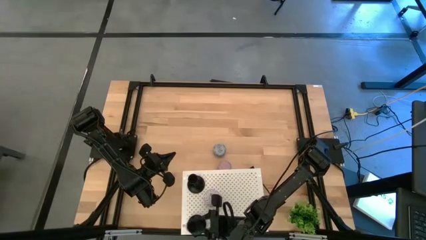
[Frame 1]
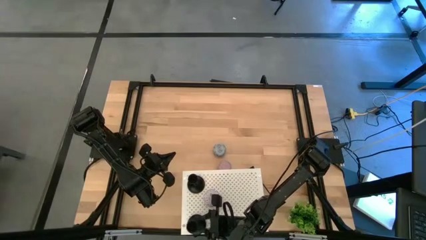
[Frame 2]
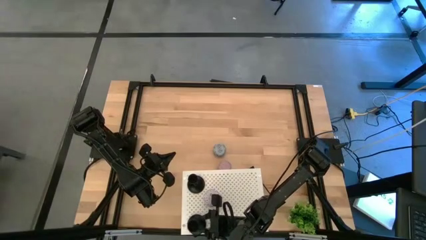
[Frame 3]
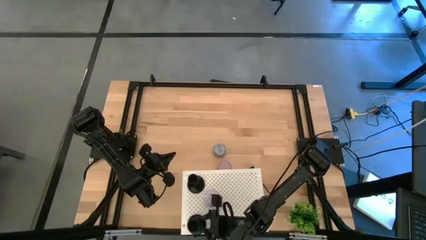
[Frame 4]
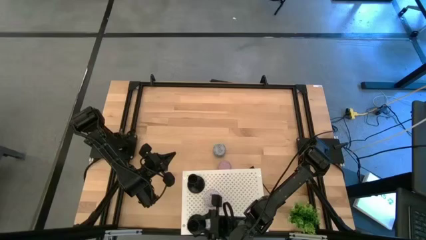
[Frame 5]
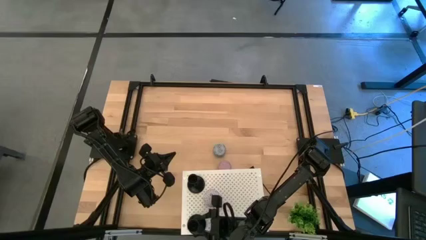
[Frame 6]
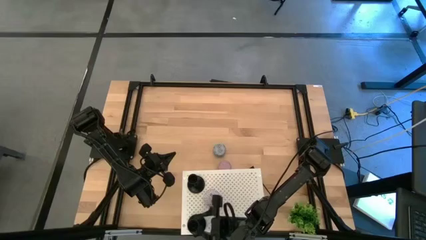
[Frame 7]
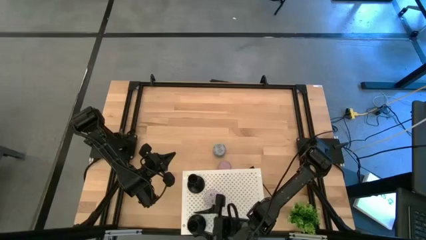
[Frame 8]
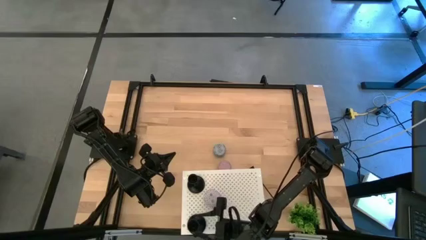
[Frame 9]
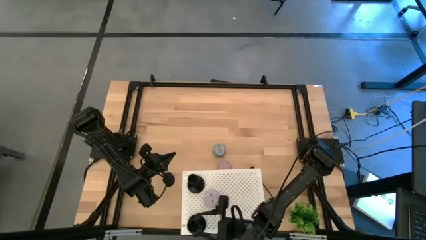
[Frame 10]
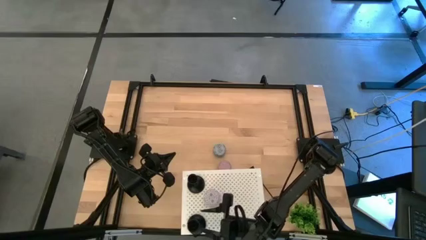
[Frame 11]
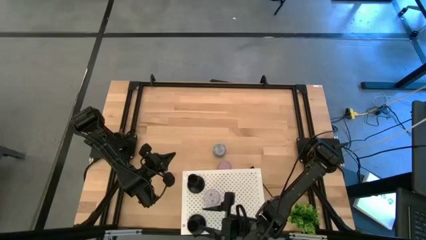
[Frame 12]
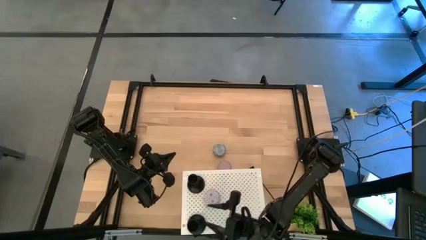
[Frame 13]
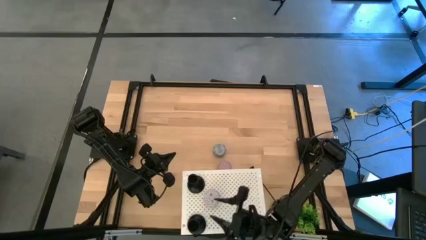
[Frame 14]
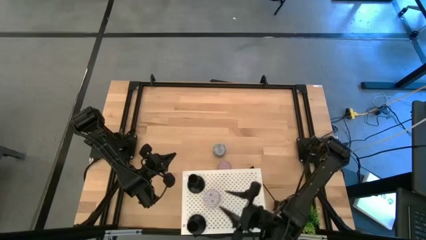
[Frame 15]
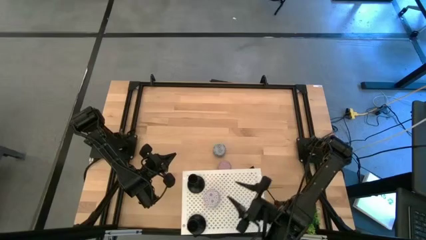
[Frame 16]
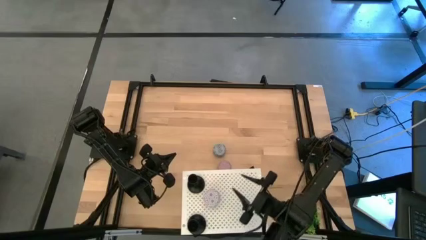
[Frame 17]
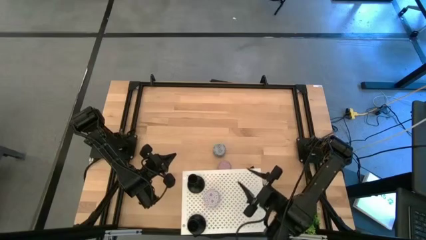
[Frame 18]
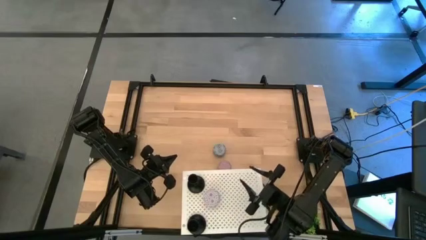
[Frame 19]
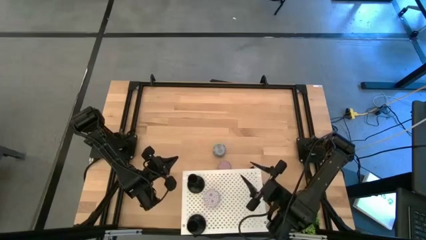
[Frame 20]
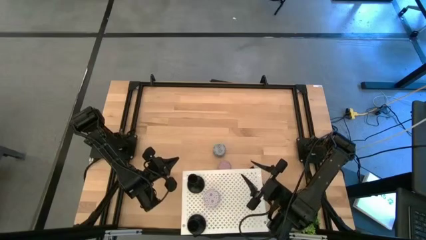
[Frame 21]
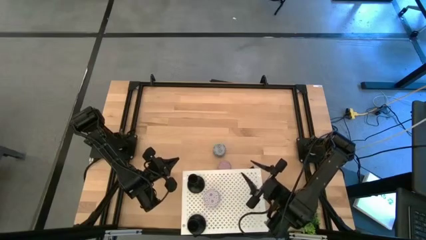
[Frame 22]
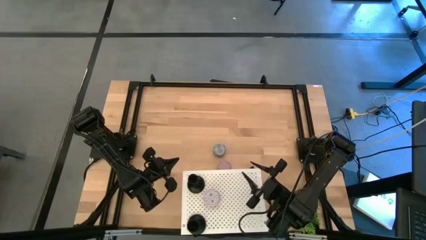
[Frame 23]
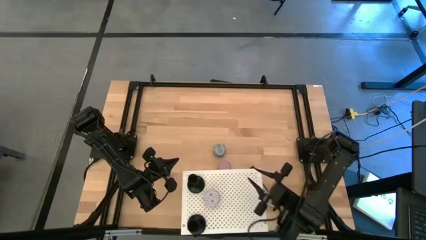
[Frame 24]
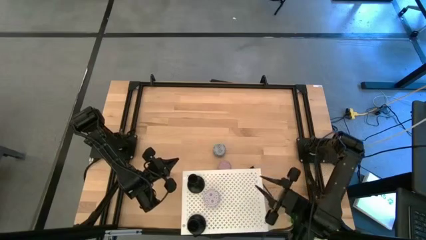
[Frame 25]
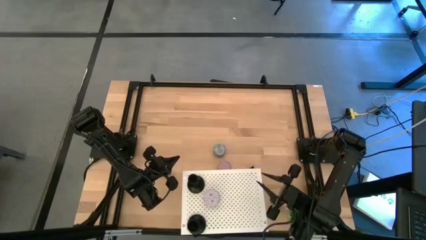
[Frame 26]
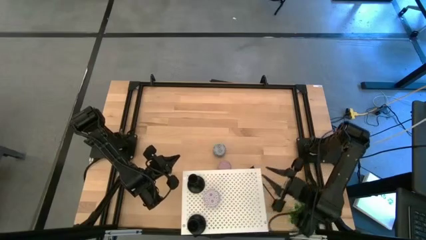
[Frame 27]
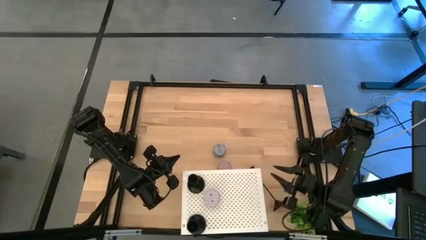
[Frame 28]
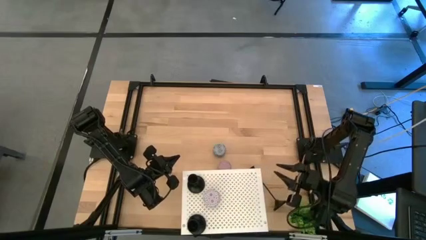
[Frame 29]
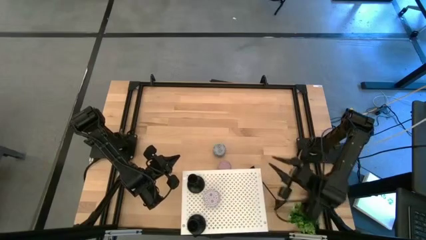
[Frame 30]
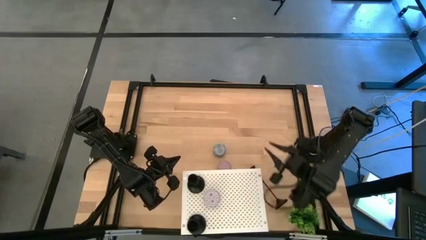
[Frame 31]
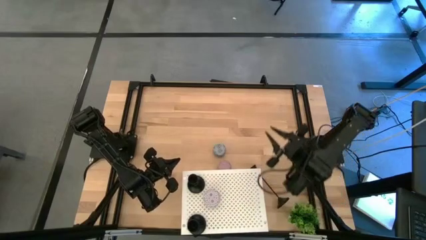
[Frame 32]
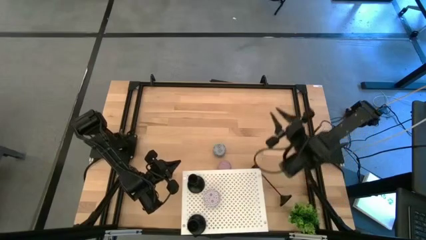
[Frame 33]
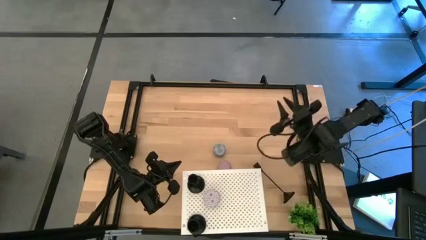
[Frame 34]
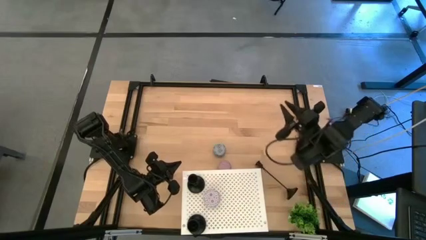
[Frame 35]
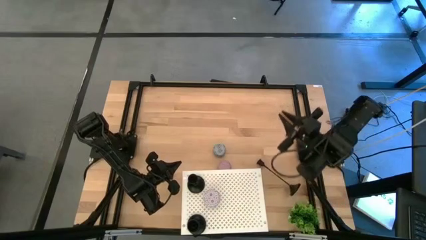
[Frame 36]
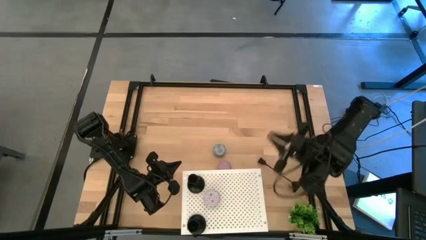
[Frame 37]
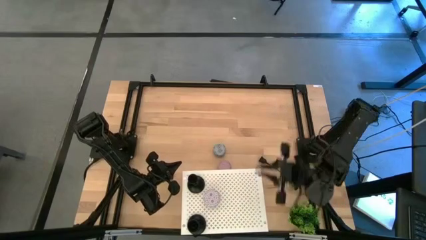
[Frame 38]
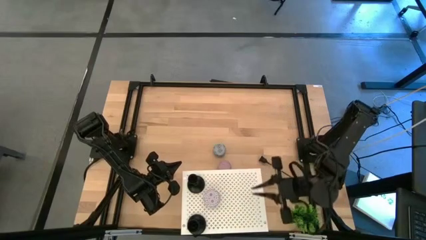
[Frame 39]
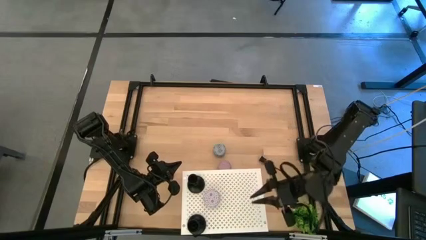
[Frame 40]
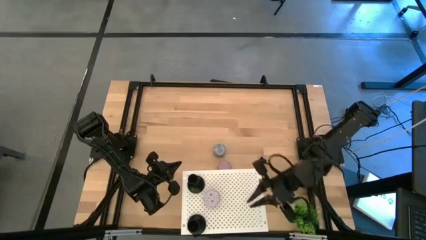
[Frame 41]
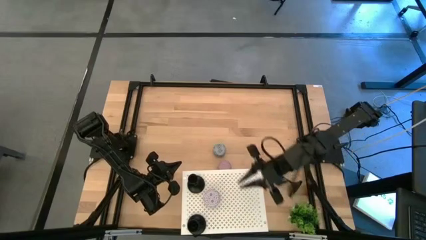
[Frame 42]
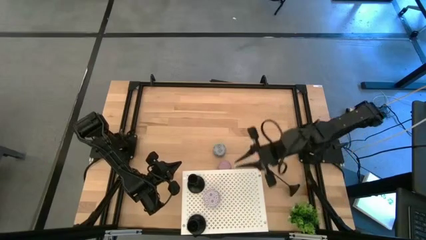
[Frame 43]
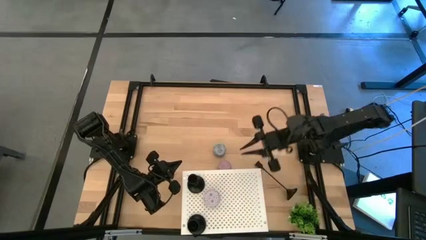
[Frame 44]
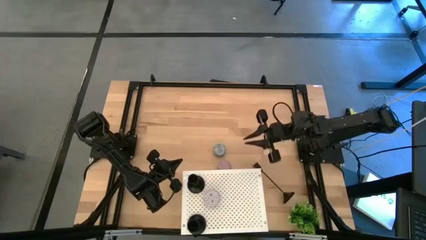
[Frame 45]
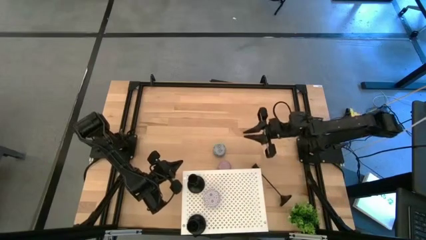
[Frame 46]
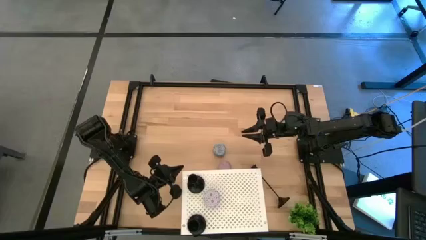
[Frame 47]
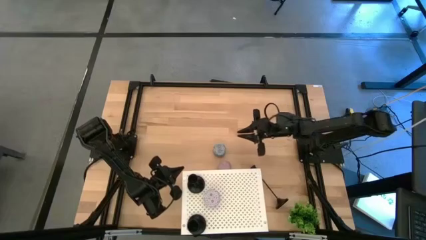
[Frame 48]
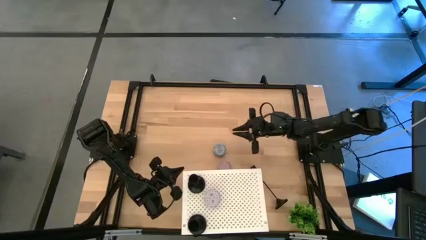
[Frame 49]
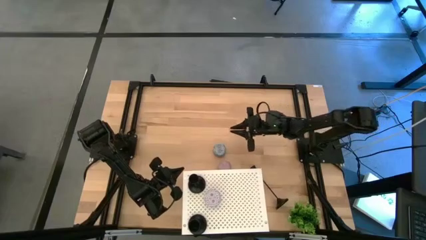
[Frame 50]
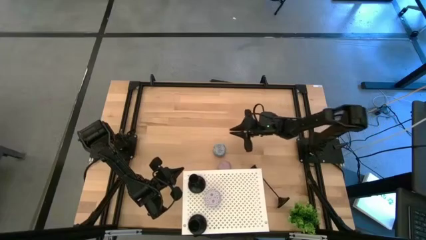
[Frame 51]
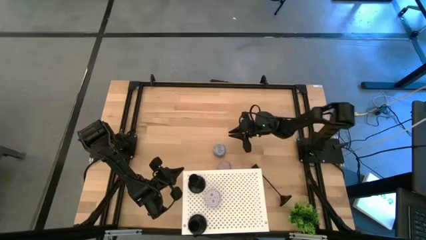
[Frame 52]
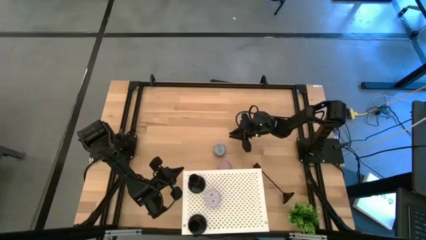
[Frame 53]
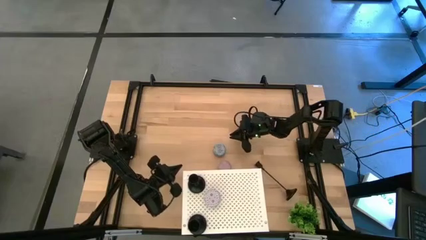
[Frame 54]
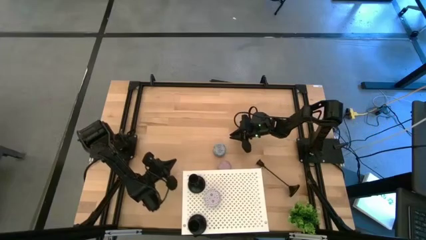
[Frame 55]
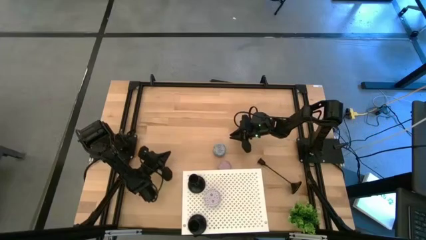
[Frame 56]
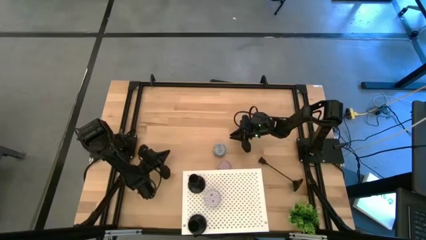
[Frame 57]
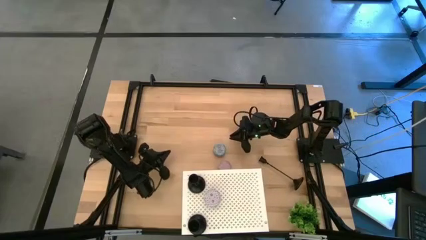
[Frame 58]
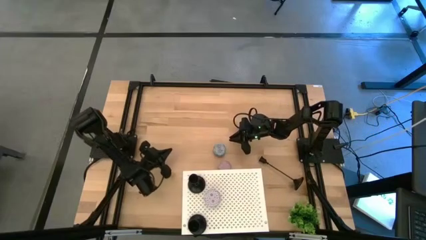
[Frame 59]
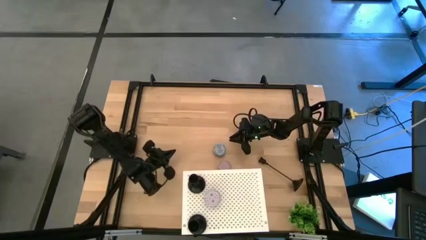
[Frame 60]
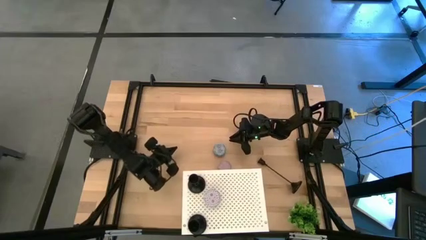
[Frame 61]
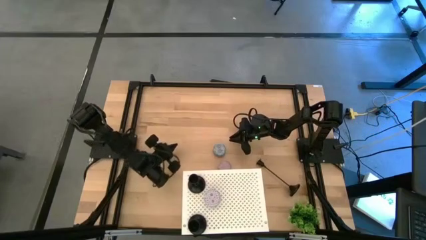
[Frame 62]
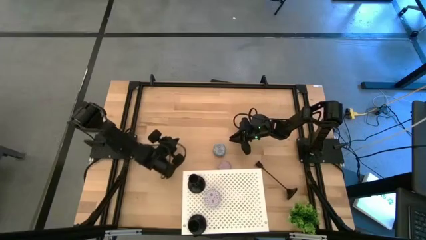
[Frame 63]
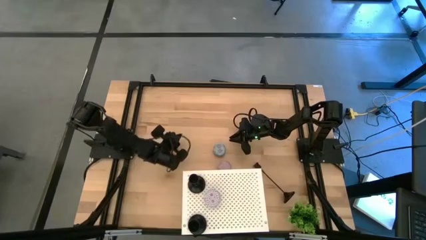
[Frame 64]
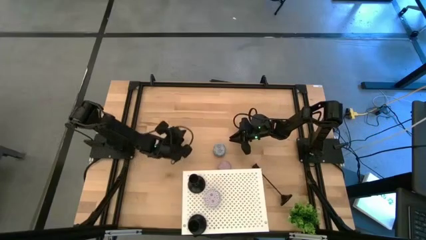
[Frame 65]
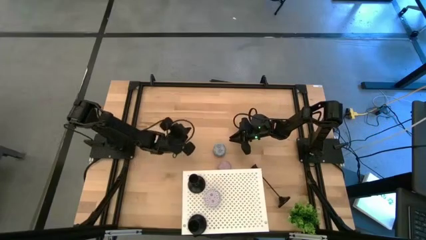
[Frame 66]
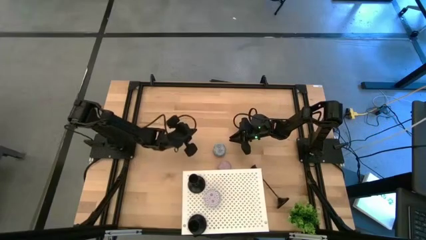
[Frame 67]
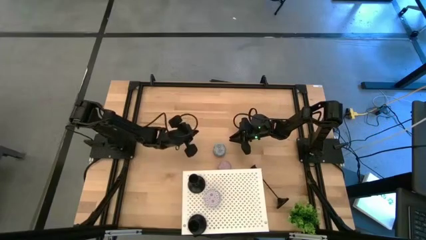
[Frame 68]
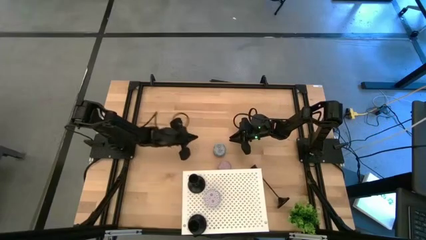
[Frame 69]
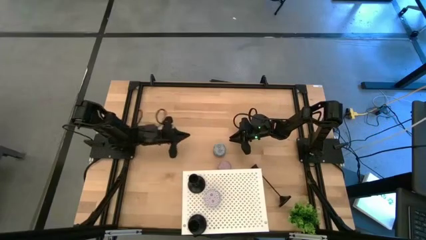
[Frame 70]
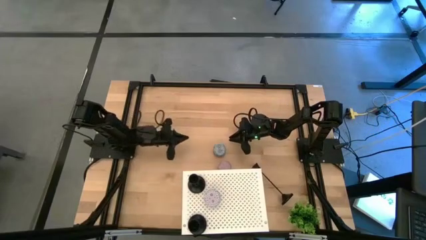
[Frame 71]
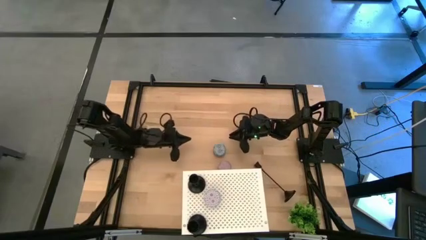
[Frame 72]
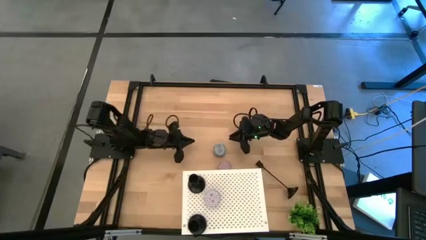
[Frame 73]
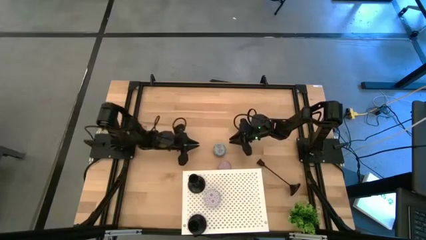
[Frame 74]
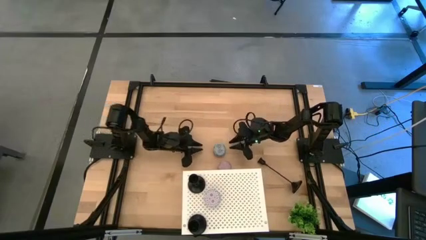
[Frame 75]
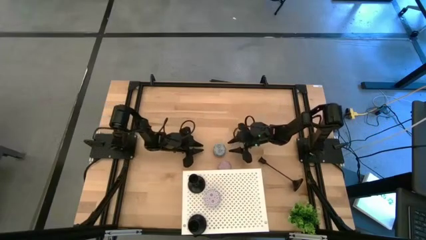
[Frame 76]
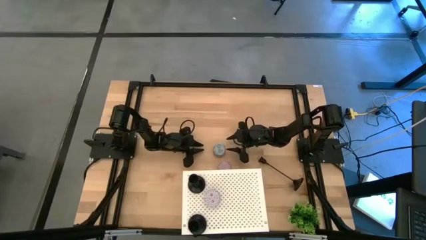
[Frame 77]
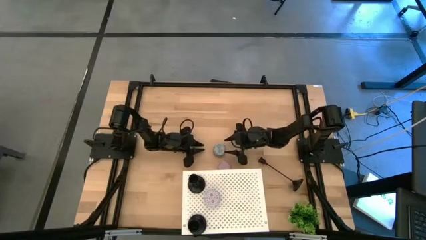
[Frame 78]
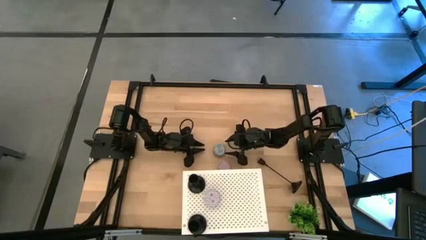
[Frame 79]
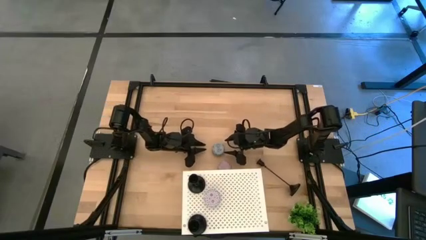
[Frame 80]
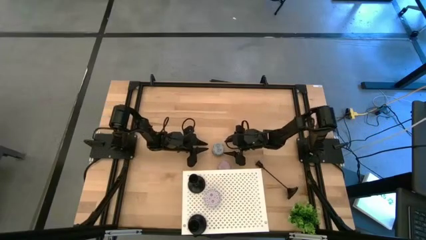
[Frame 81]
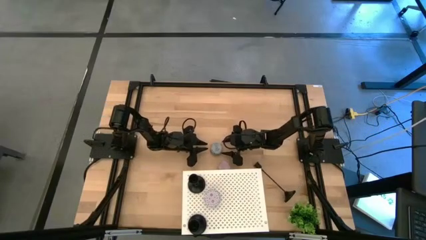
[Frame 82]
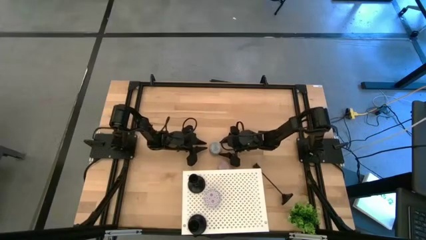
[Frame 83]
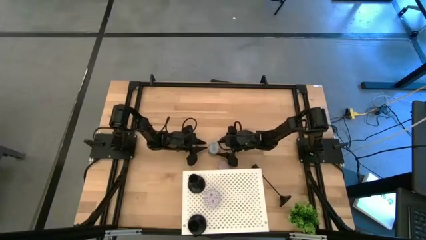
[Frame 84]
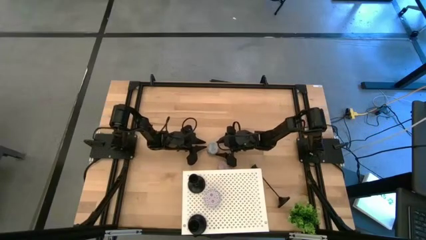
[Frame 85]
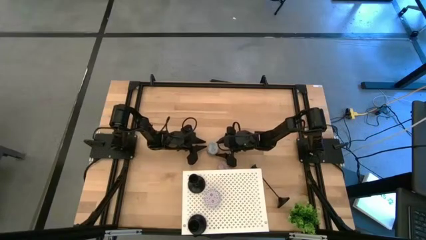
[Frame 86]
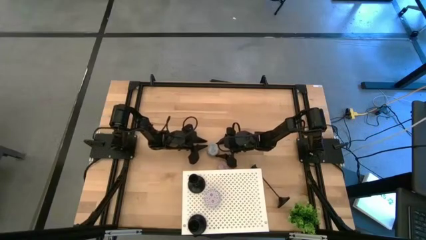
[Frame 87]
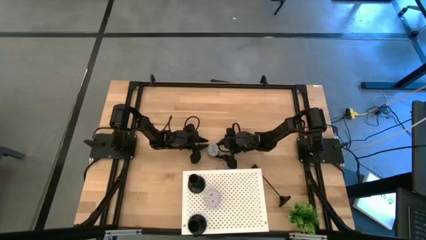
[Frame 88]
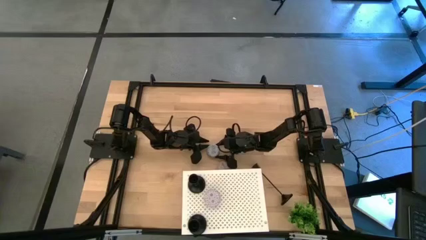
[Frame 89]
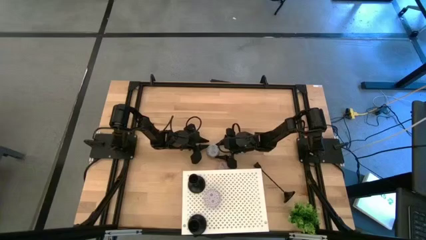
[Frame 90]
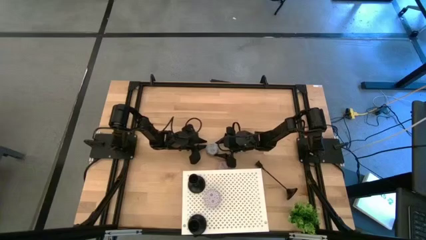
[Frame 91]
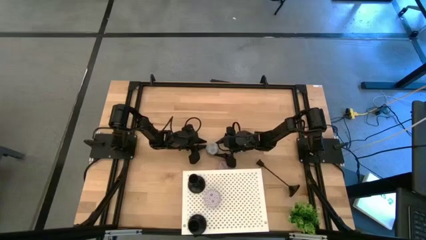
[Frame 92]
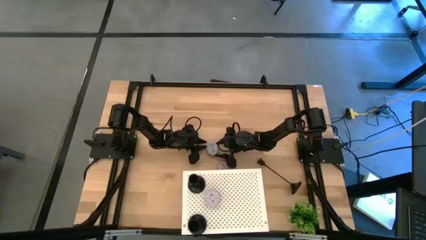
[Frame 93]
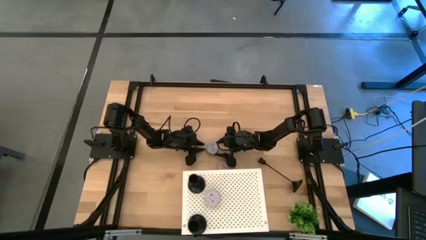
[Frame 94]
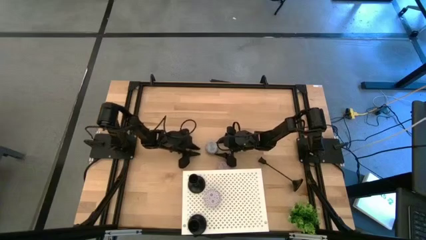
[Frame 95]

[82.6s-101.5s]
Task: Pick & Place candle stick holders
Put the top scented candle on the shelf
